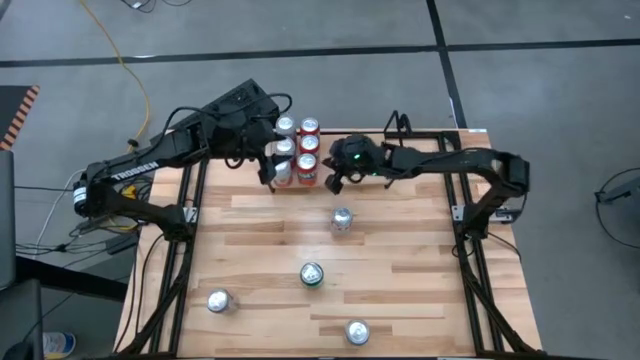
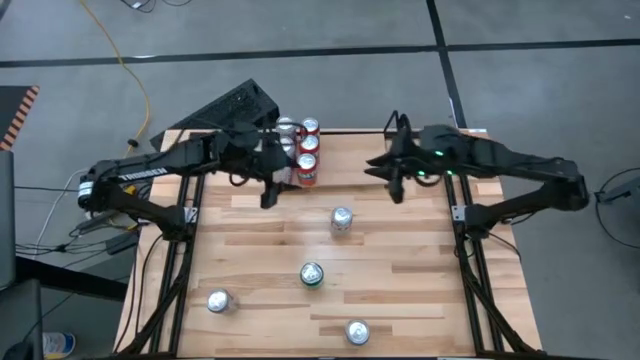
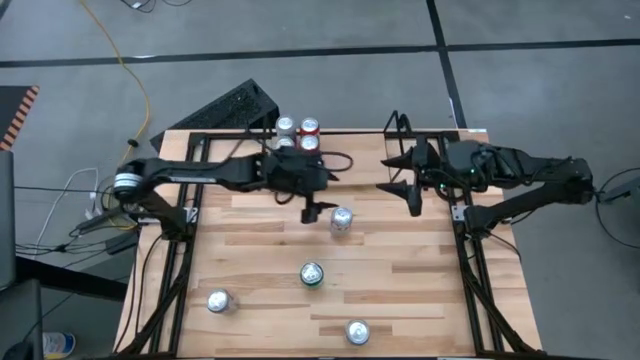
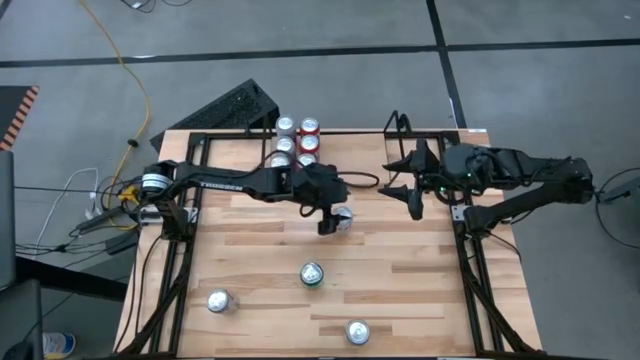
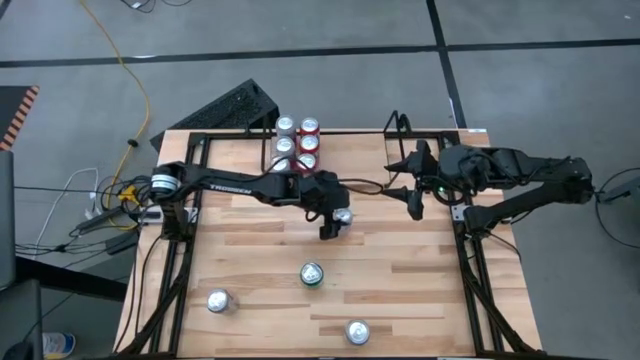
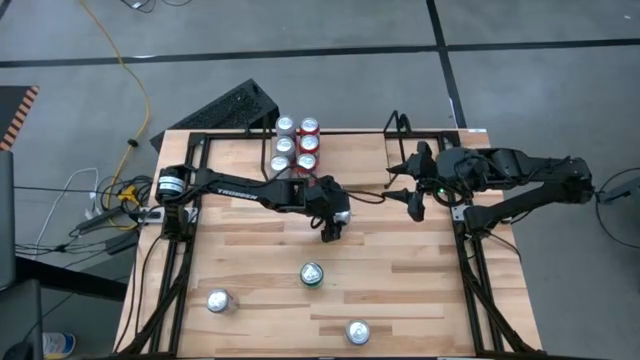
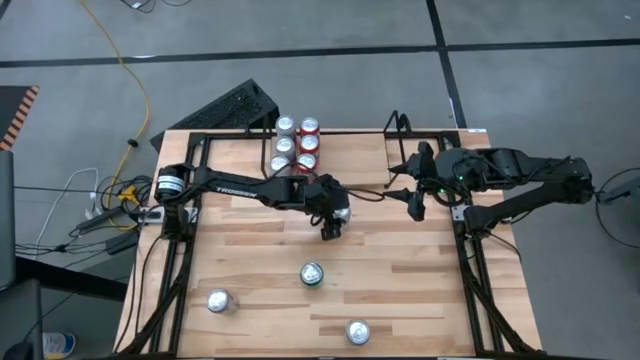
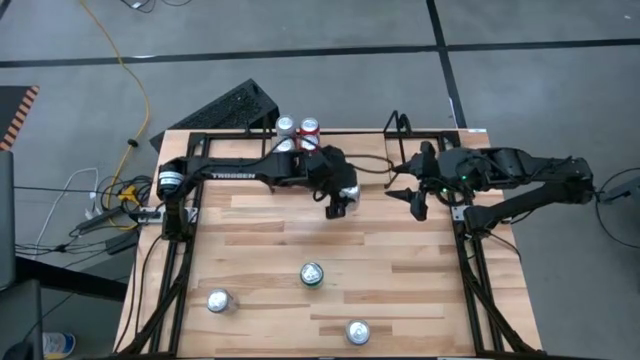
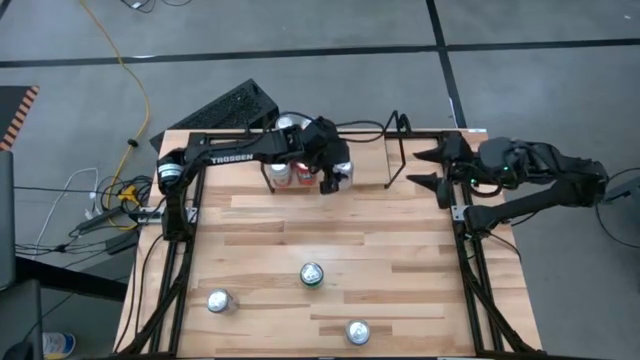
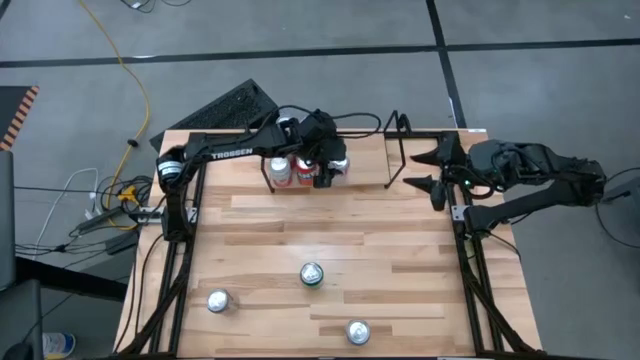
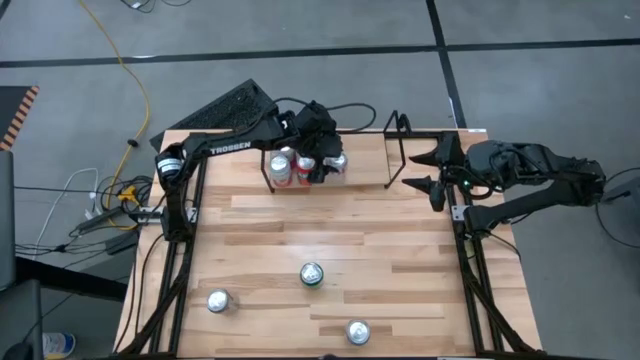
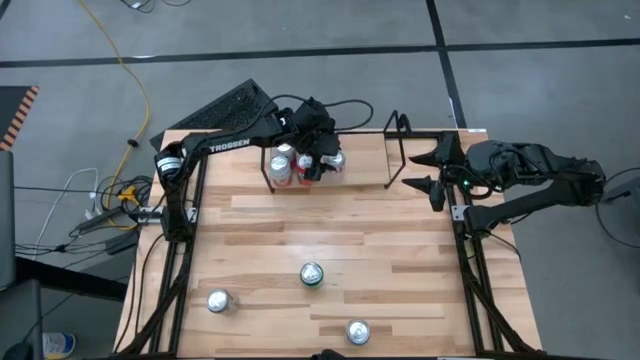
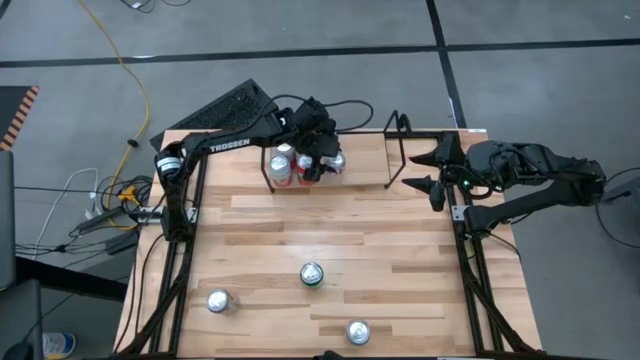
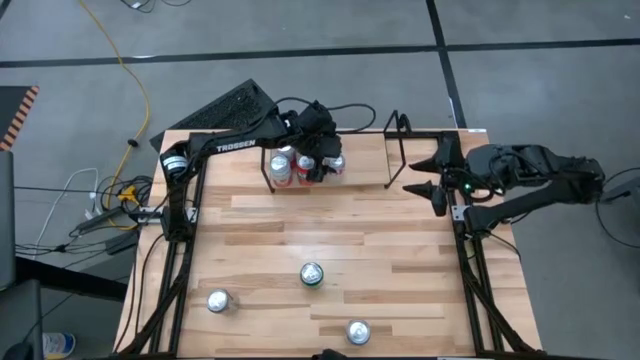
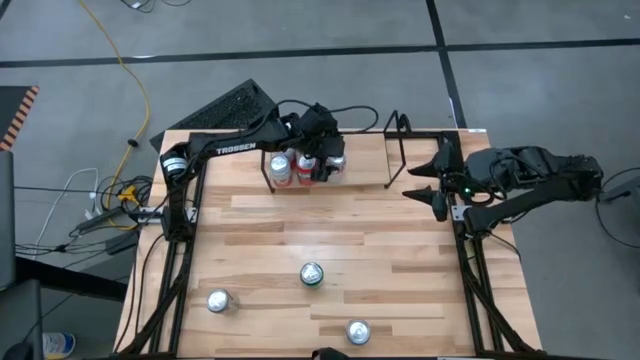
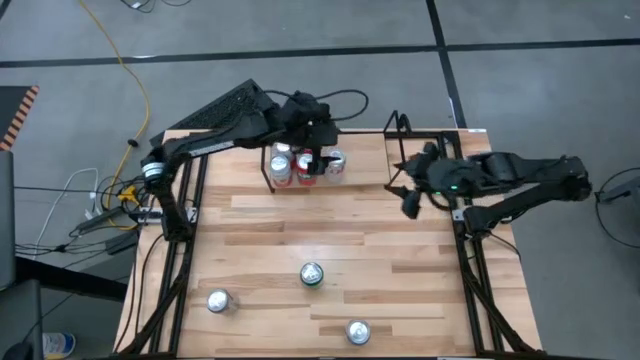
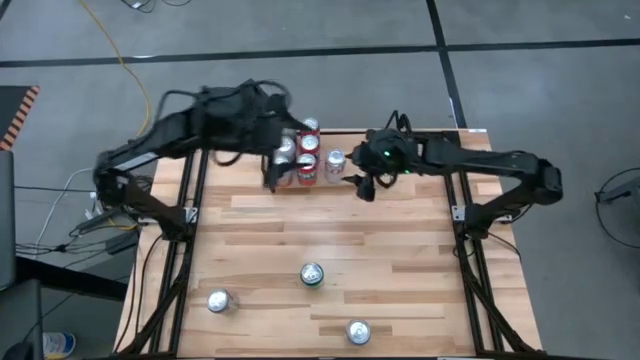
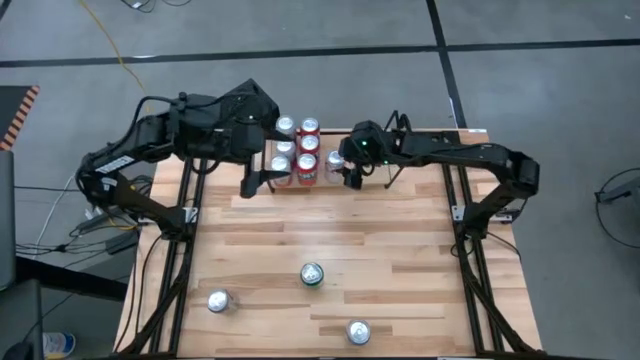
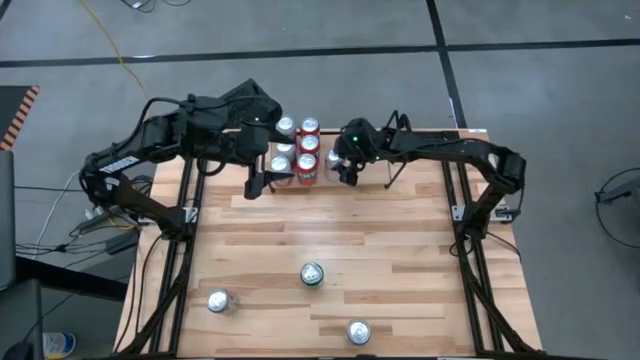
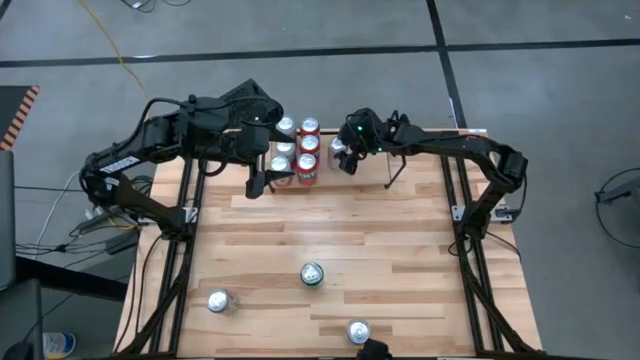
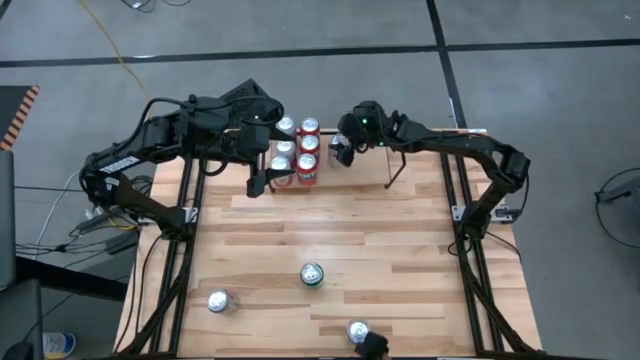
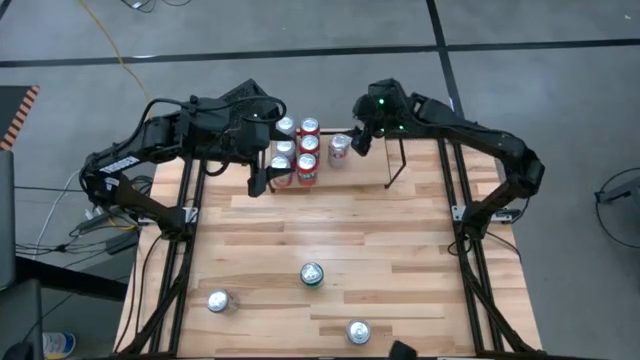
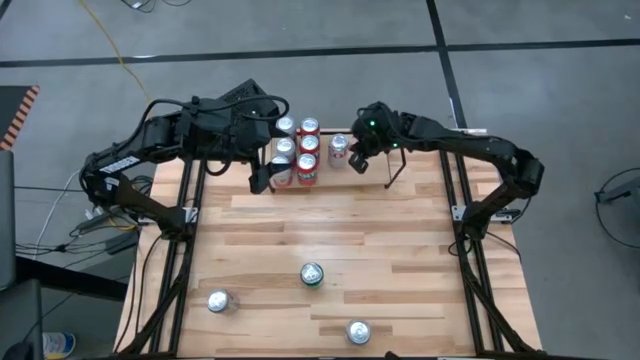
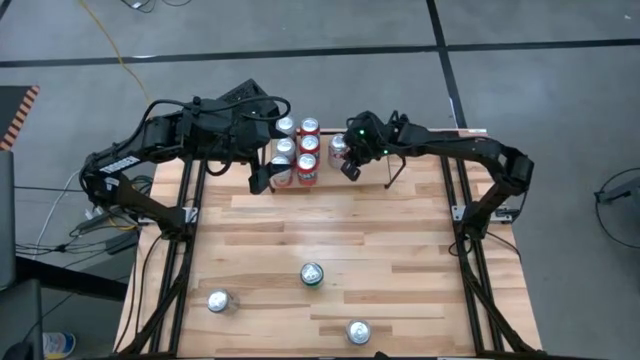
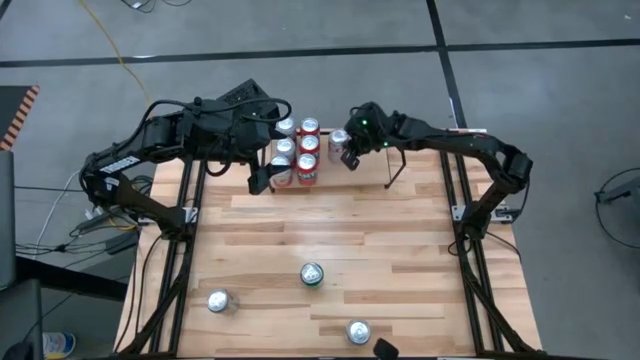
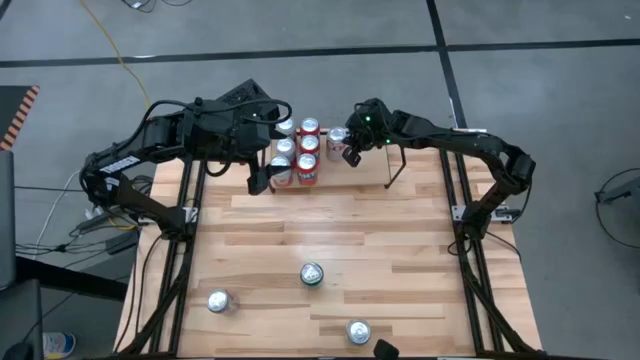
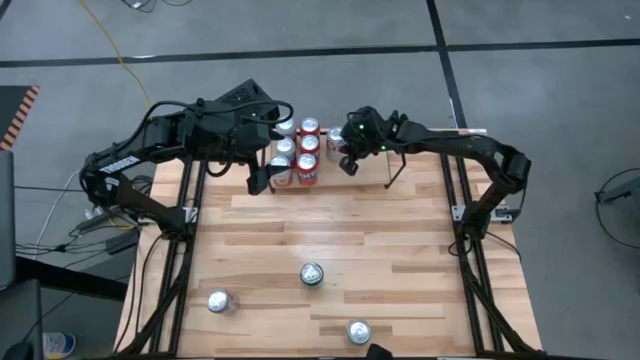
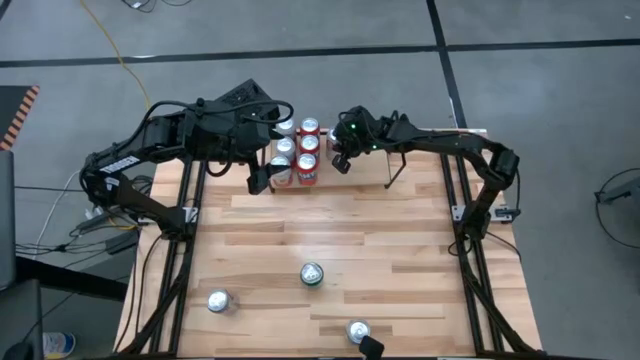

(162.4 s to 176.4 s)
Task: Place canned beverage on shelf
Put the top right silver soda can on the shelf
